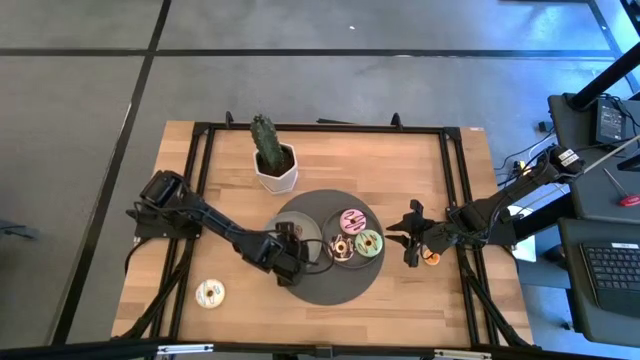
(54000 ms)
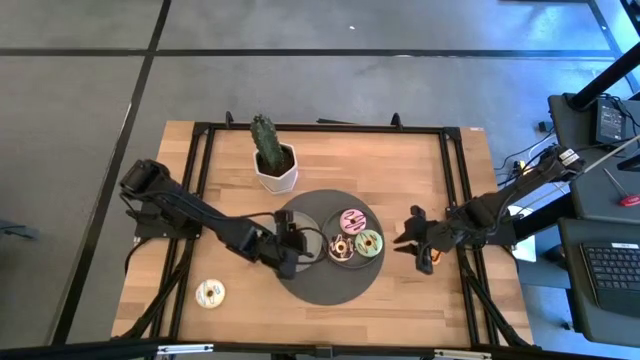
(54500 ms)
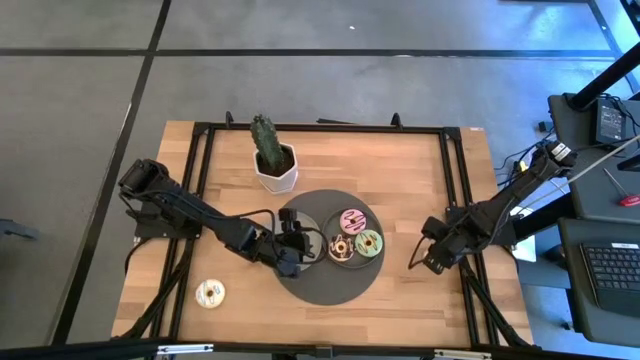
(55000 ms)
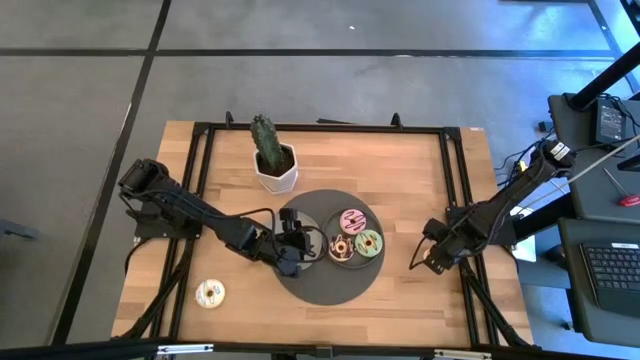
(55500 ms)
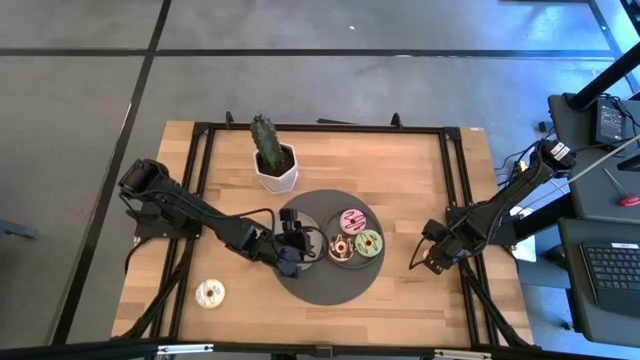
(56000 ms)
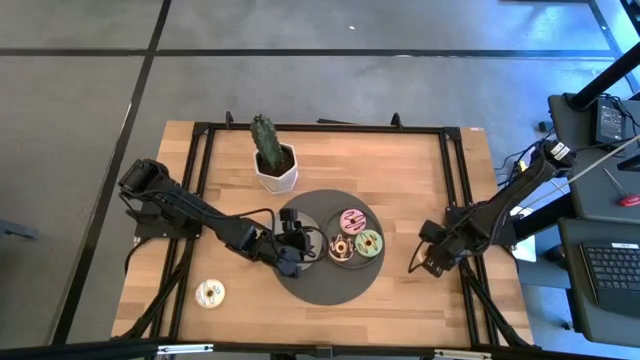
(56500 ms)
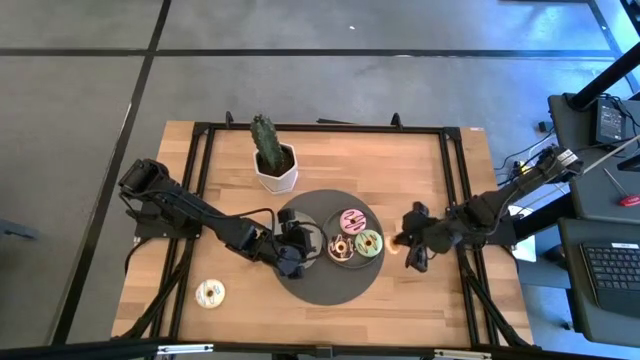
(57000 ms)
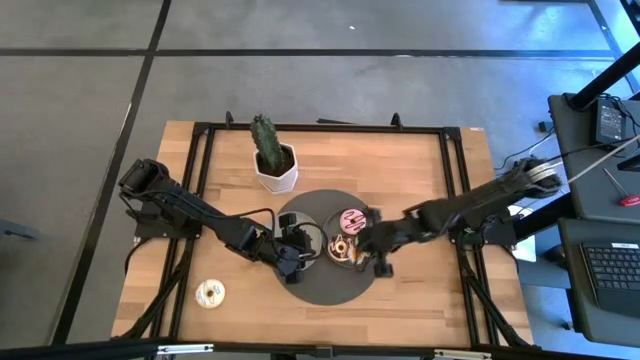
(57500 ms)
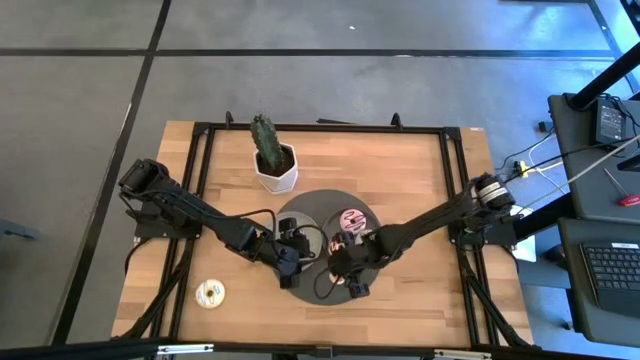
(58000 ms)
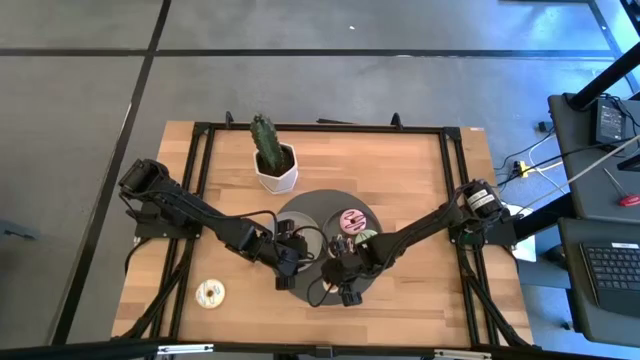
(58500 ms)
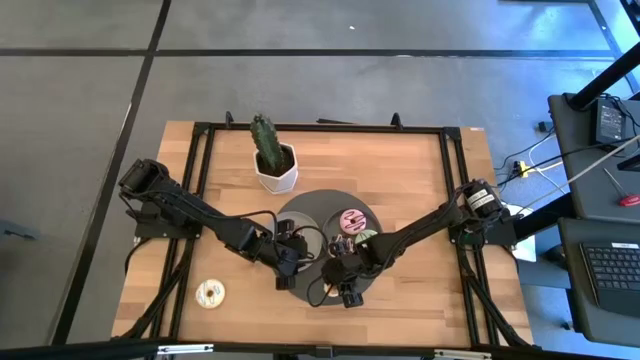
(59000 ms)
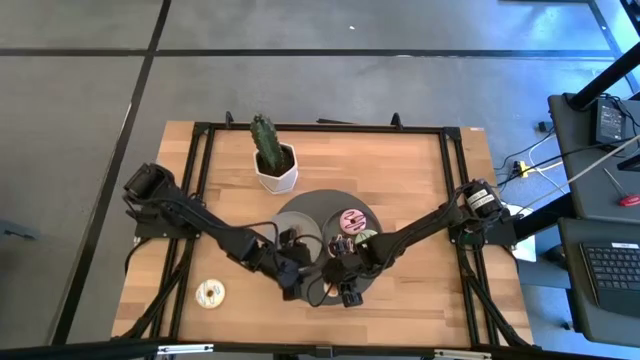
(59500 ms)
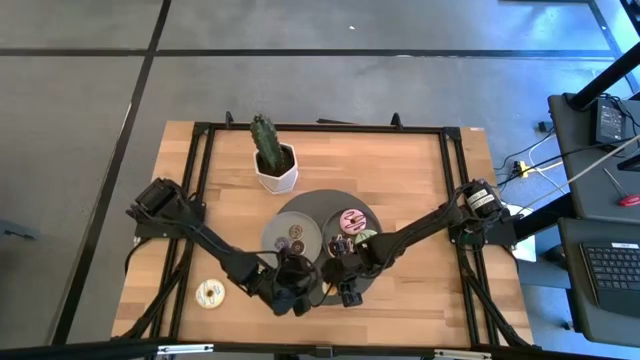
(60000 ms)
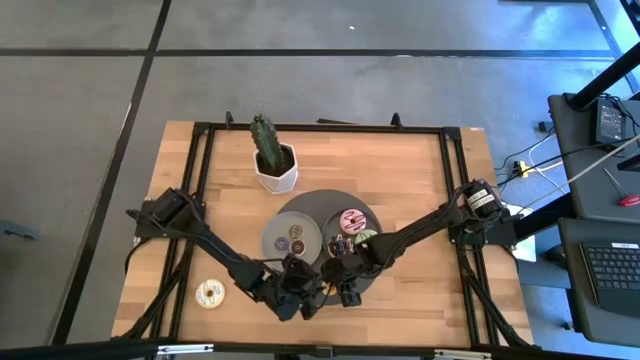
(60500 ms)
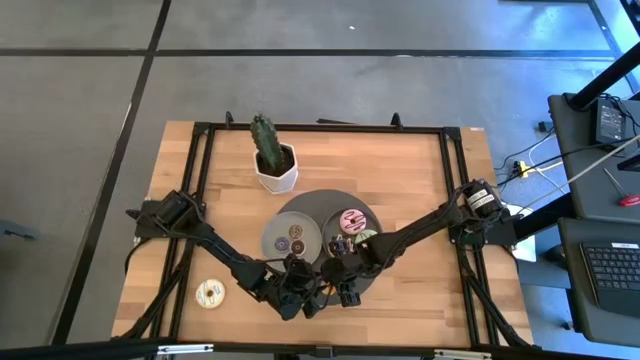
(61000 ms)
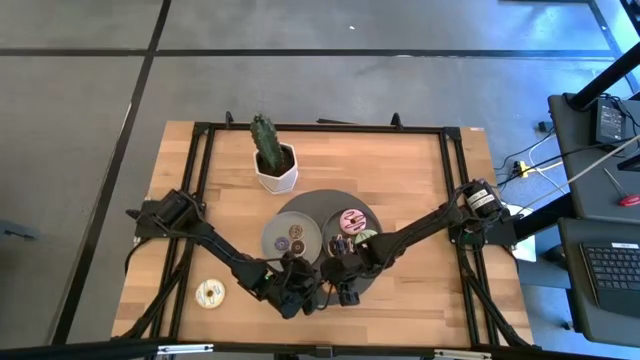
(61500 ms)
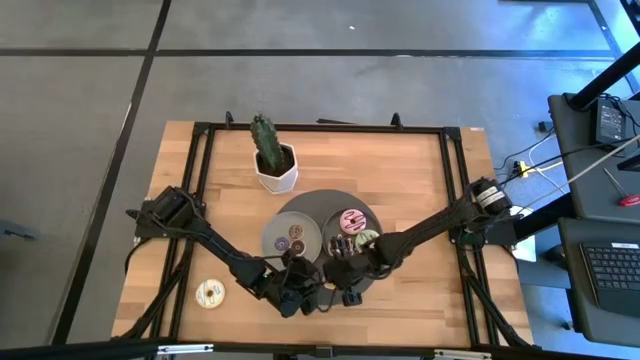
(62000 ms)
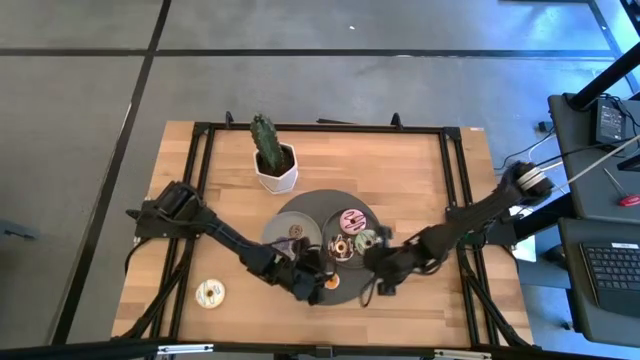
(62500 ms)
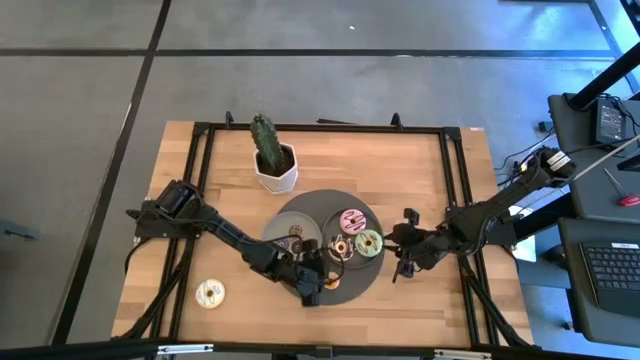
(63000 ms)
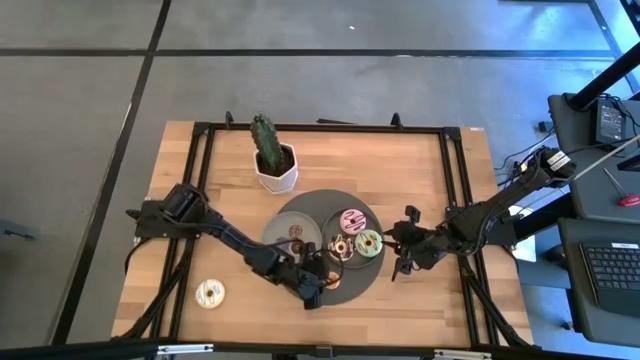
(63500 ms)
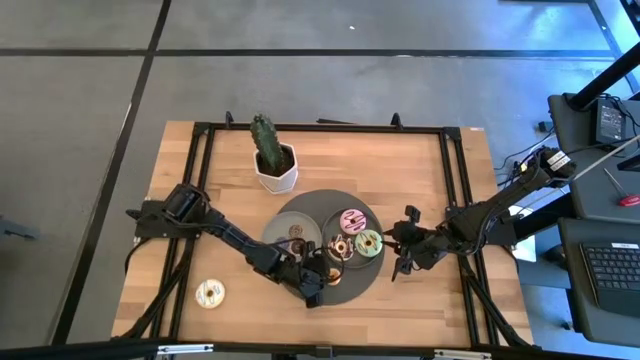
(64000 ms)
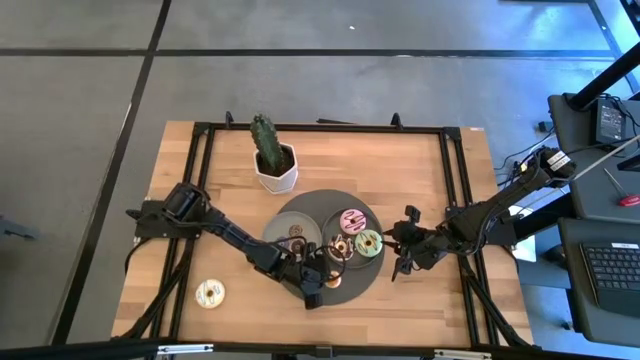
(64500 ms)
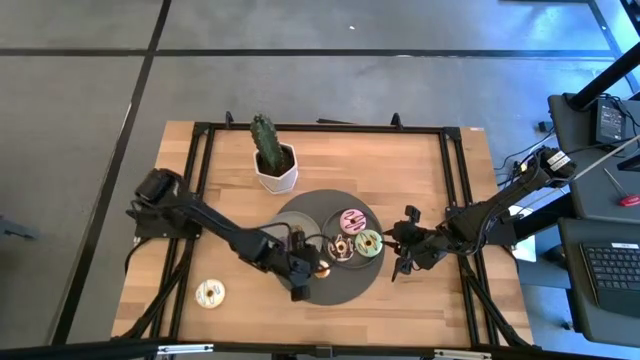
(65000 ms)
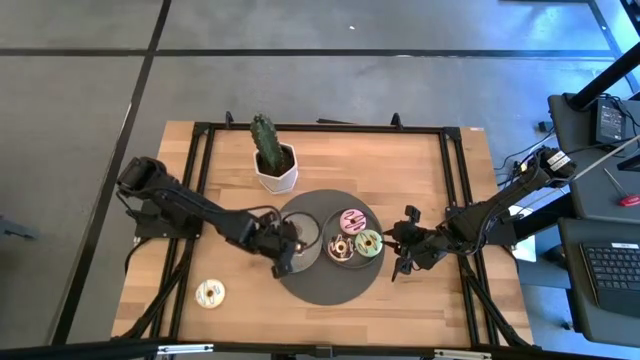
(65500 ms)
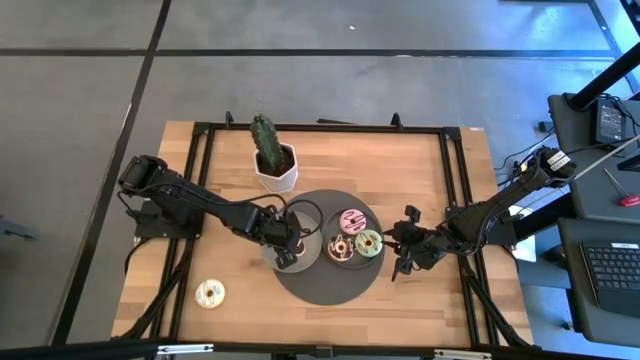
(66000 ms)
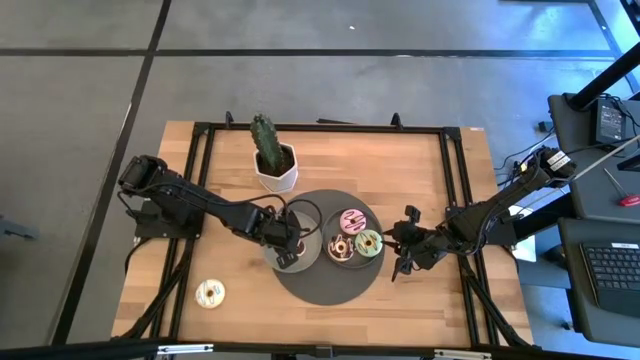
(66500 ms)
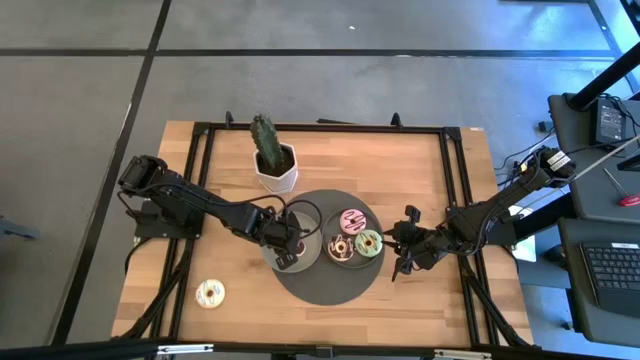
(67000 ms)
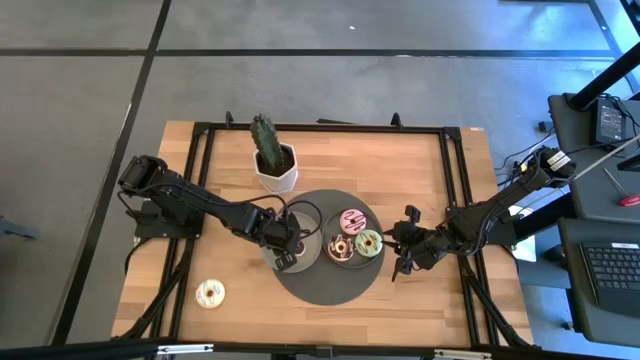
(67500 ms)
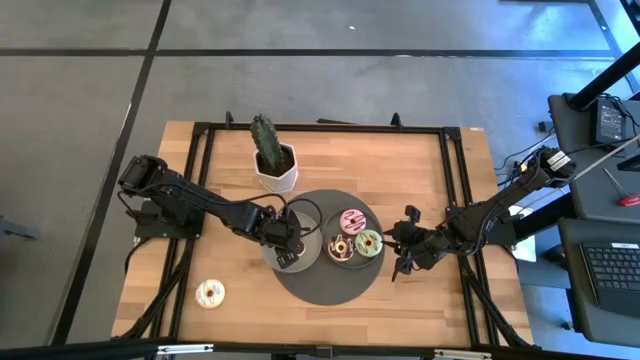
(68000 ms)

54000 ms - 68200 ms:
Task: Pick & Place donuts
Put the small yellow donut on the gray plate

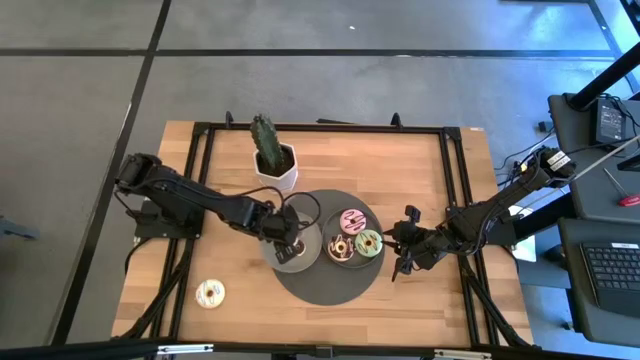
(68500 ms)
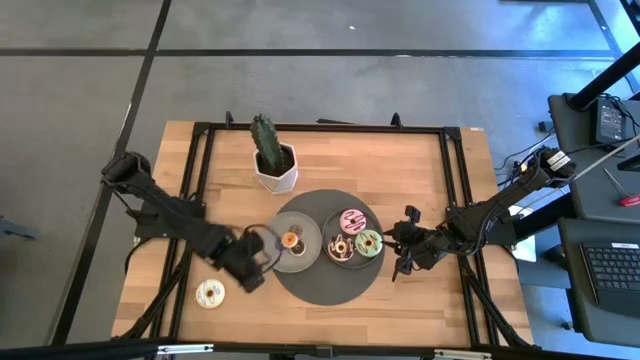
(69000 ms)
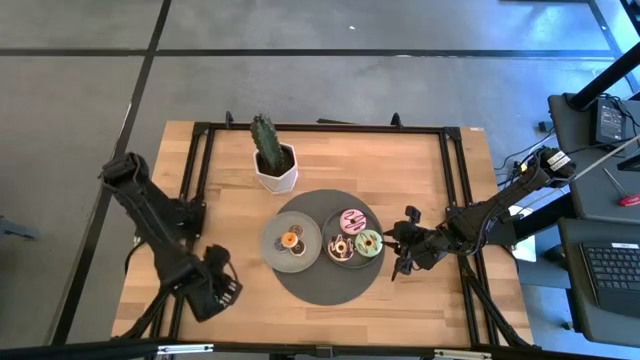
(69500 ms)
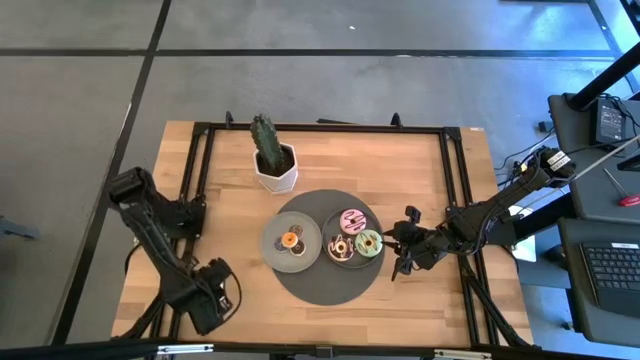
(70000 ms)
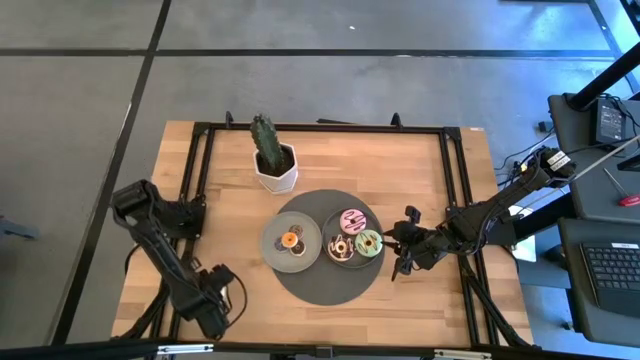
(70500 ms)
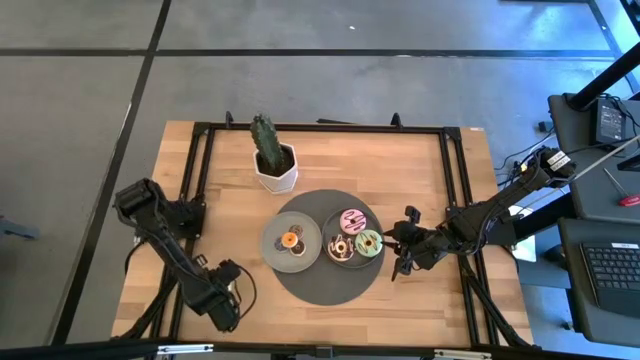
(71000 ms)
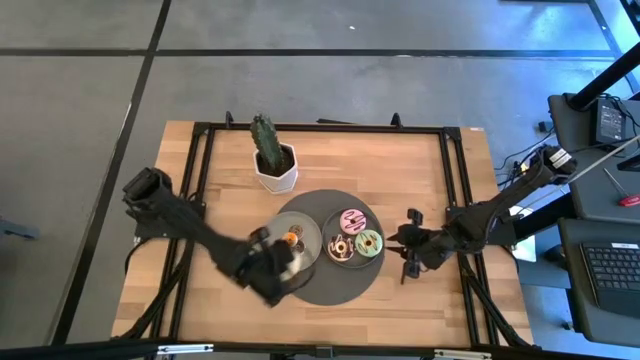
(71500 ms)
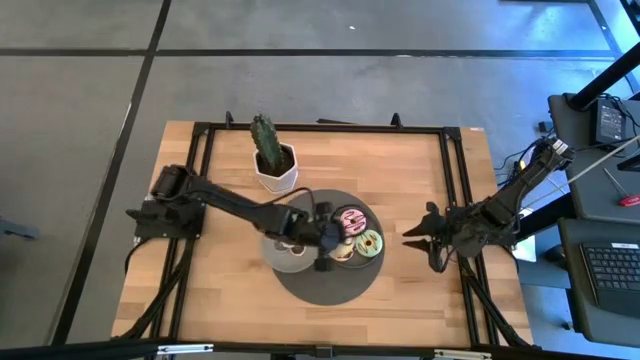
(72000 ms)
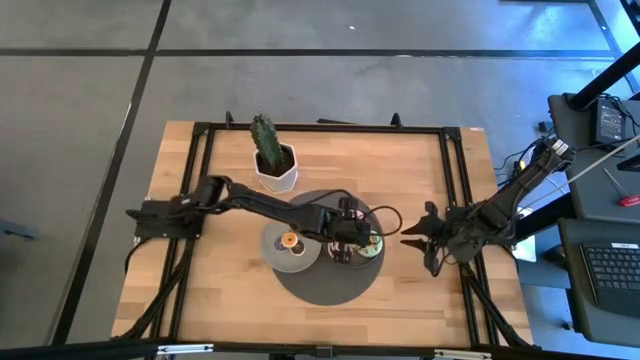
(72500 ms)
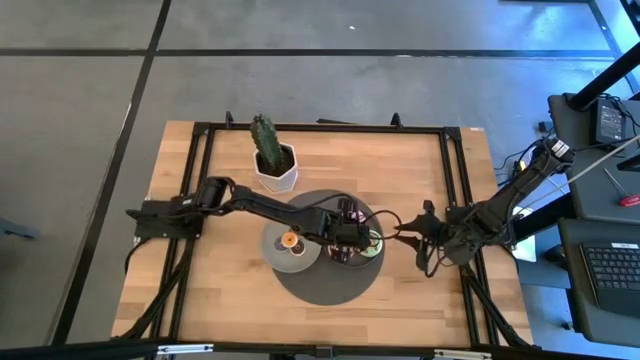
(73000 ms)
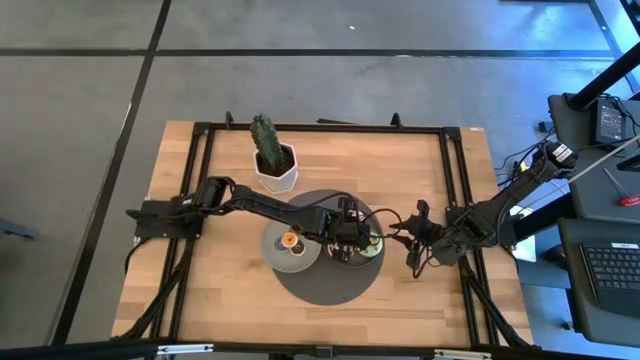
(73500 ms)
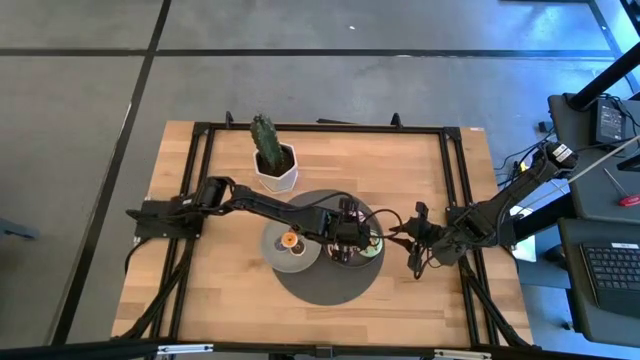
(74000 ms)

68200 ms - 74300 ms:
Put the large white donut on the dark gray plate
